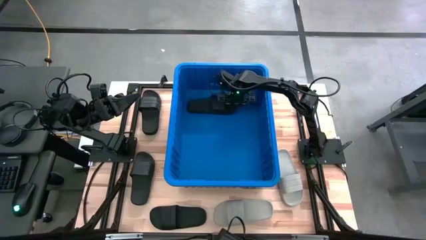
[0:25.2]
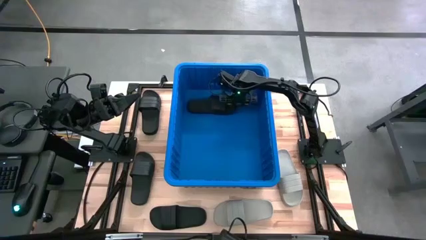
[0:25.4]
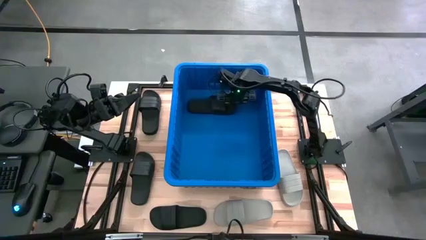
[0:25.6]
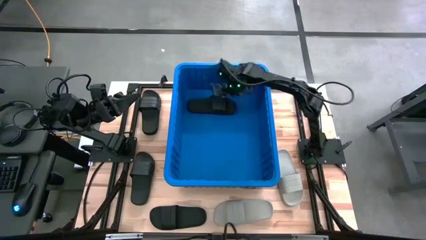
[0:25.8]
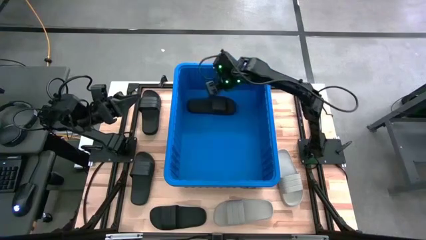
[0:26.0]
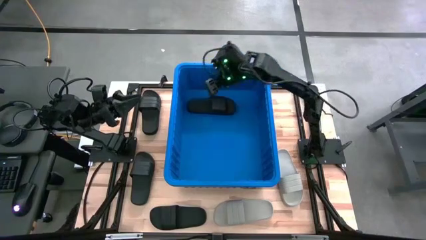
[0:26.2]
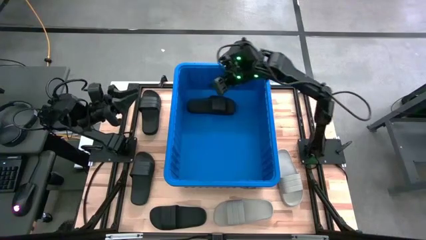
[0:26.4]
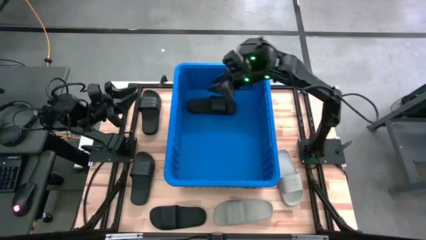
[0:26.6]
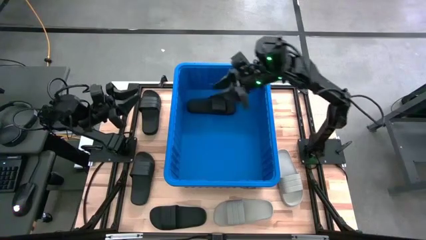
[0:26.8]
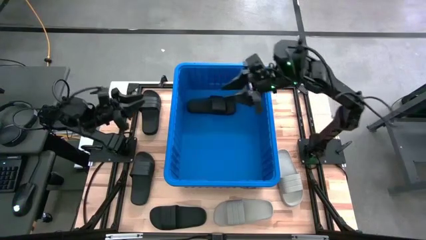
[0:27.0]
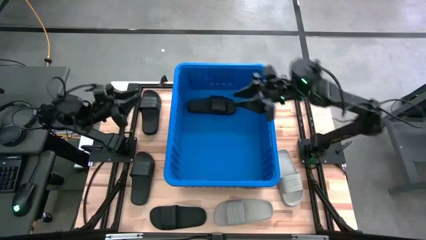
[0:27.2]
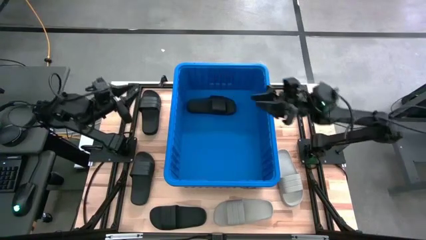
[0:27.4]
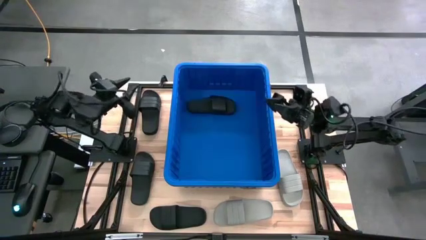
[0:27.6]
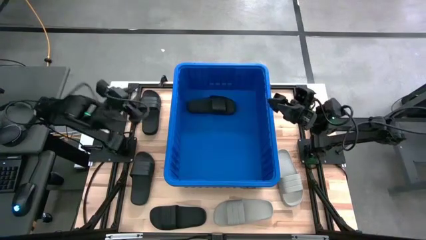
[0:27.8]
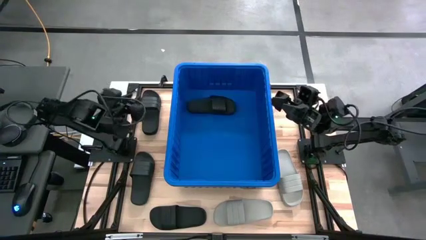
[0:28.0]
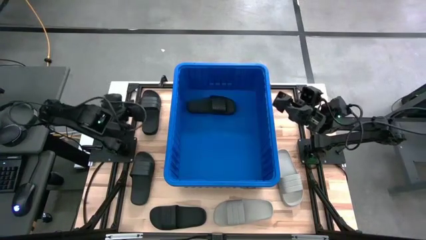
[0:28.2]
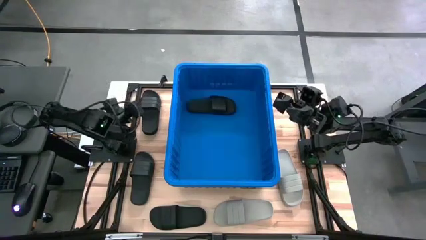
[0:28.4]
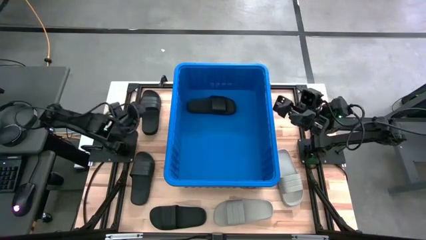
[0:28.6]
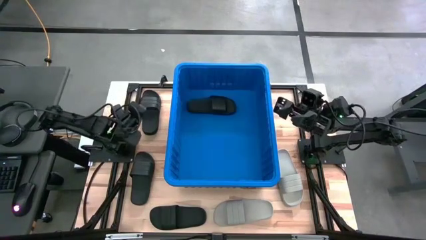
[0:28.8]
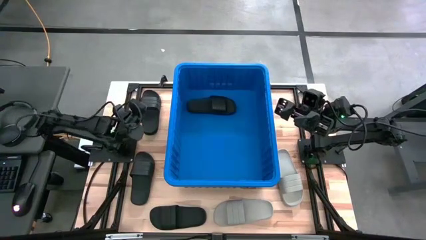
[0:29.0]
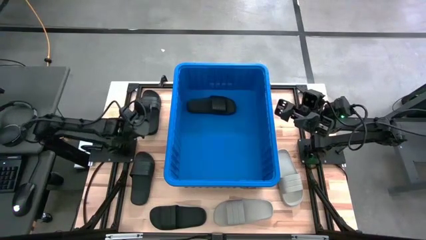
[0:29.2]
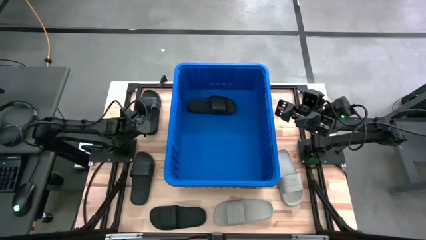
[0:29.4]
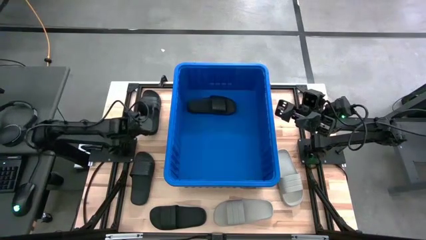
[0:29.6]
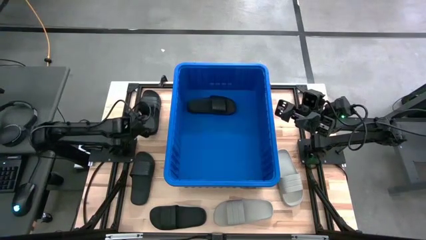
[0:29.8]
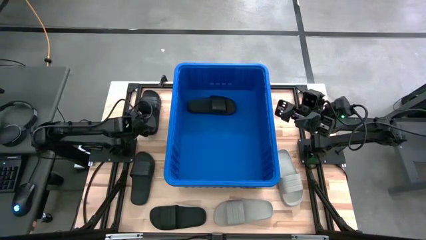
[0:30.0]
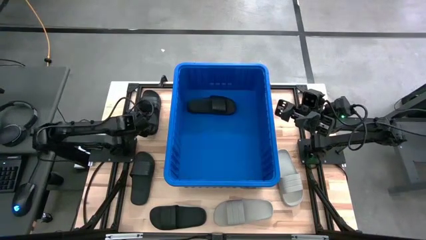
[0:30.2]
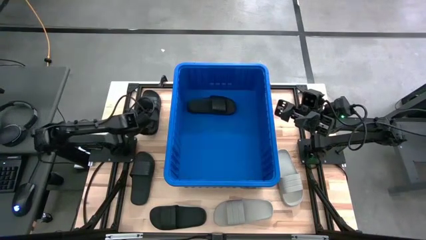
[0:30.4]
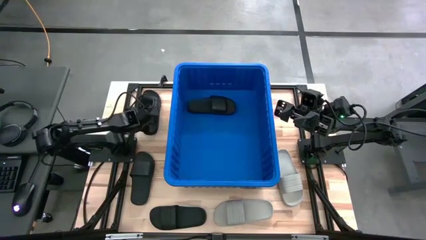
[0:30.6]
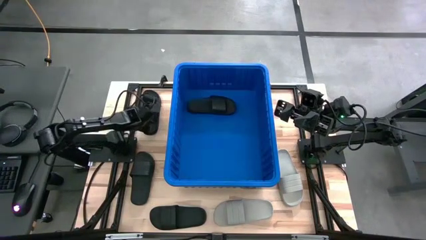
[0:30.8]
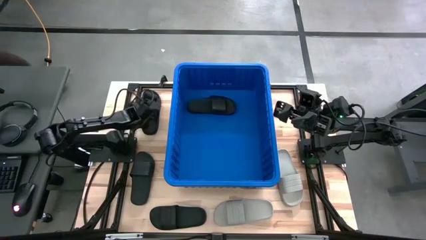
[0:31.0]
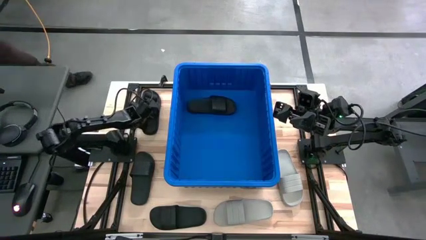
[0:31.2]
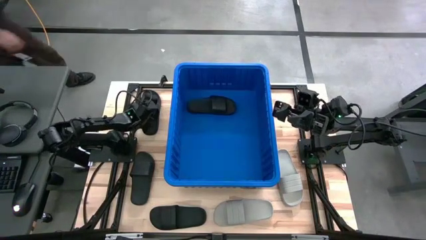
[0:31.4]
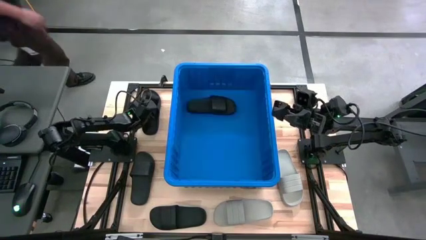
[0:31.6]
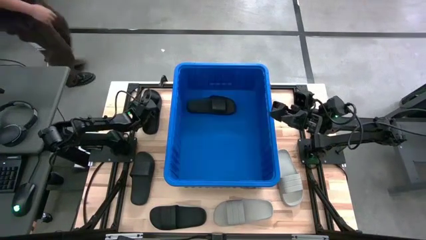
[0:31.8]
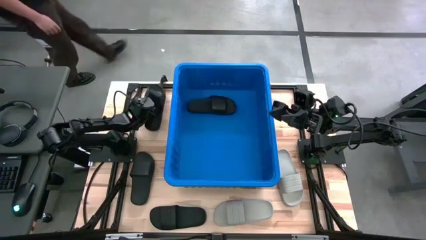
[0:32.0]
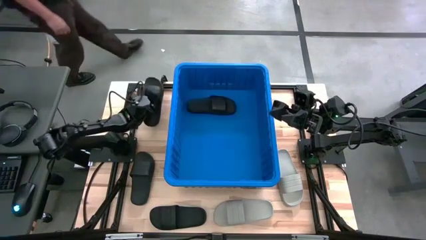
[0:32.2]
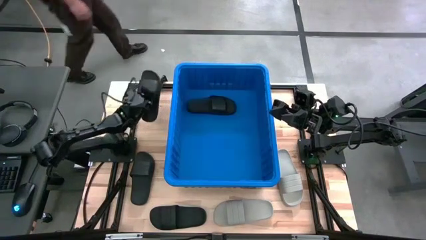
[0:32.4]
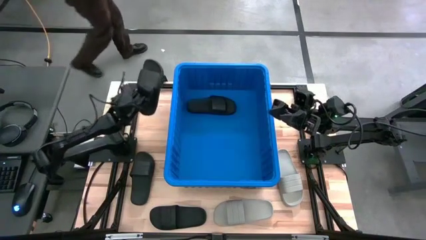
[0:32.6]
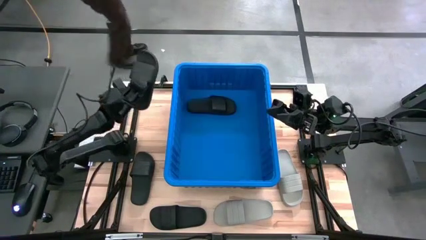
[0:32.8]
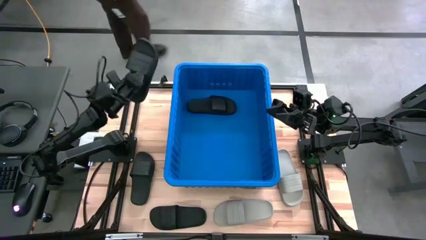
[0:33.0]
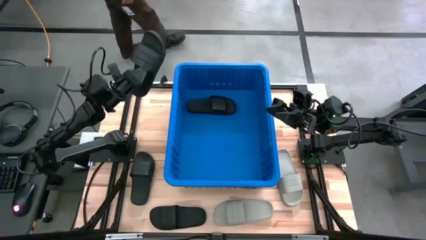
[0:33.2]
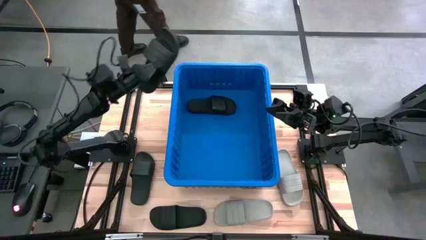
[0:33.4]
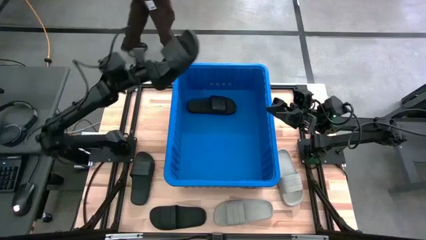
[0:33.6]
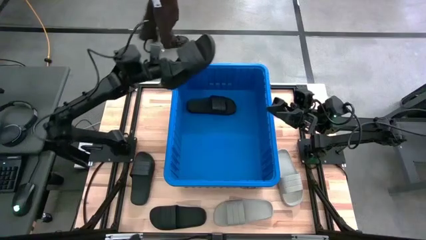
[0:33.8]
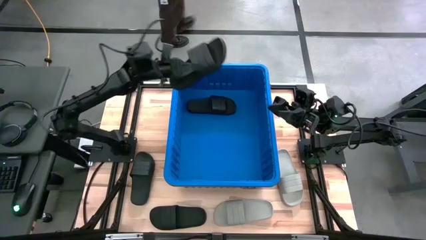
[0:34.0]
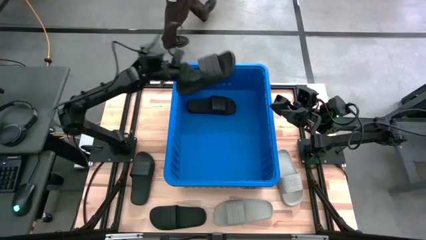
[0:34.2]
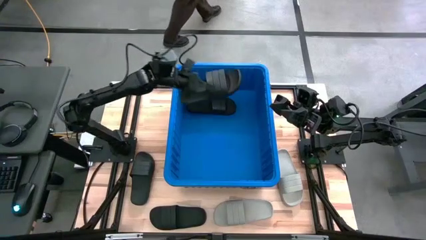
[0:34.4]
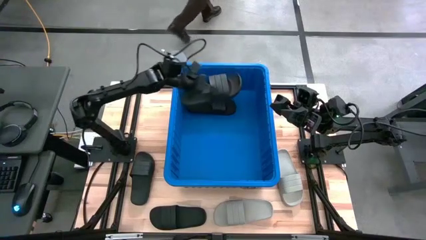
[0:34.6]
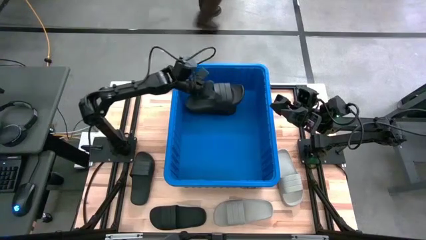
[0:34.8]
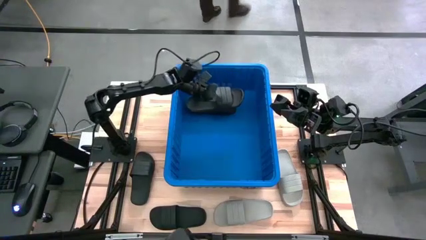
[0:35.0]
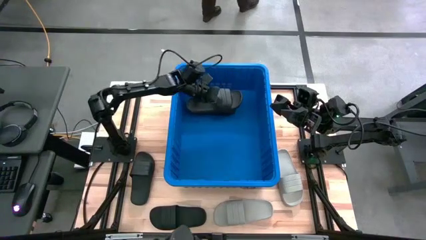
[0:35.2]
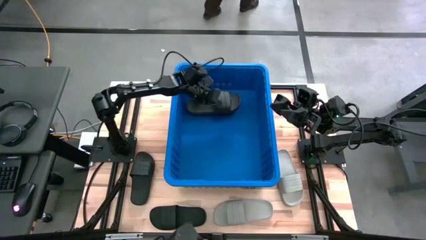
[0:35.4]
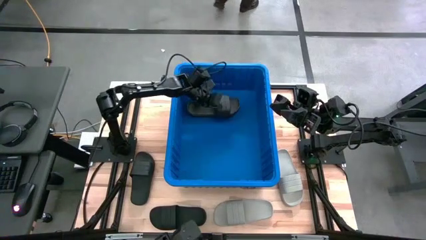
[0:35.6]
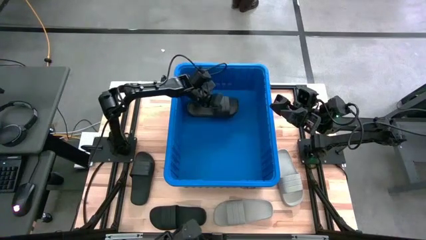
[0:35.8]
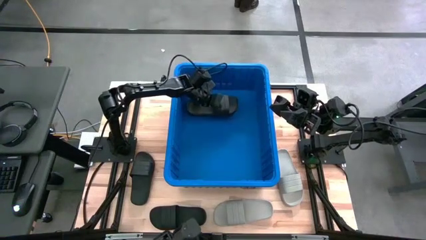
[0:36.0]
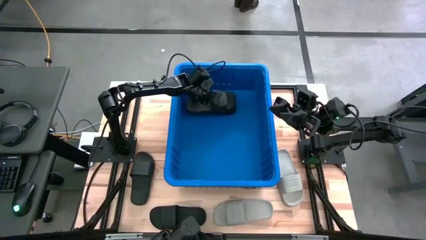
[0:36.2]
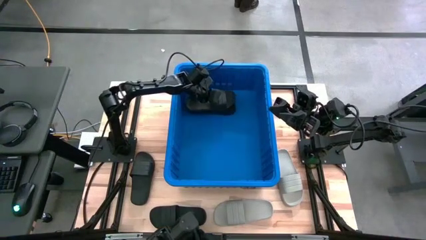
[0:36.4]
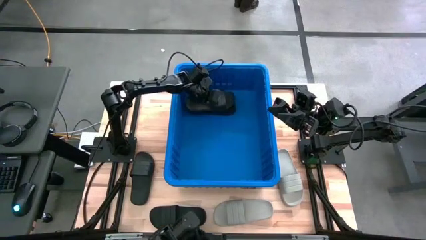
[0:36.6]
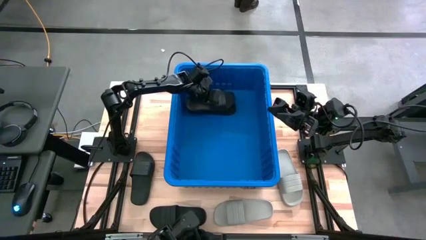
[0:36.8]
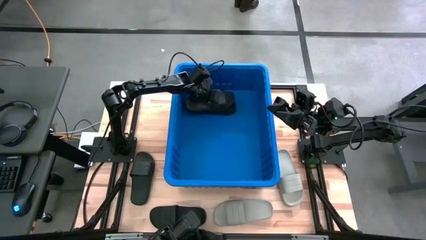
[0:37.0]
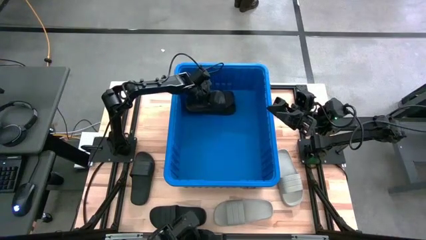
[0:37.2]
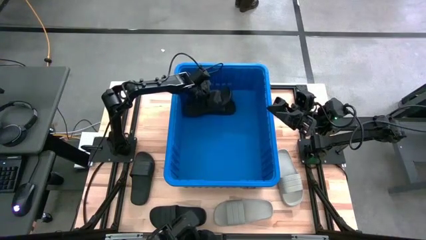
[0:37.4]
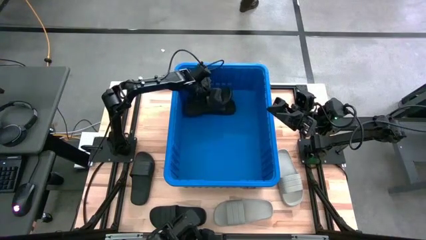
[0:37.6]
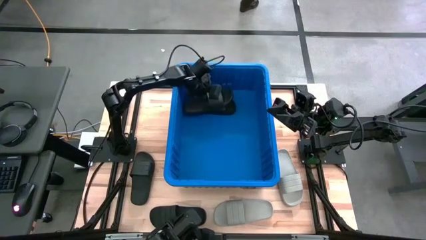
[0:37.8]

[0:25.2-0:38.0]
Task: Pick and place slides into bin
Put the top left black slipper into the bin
